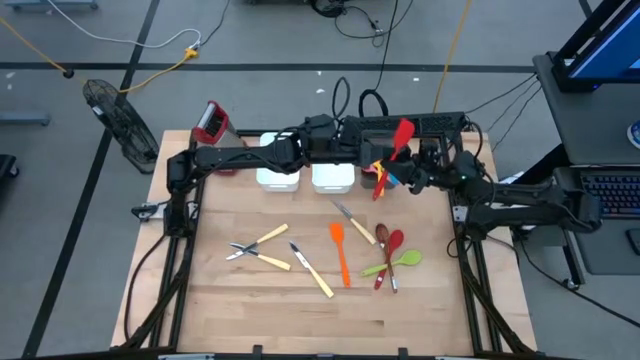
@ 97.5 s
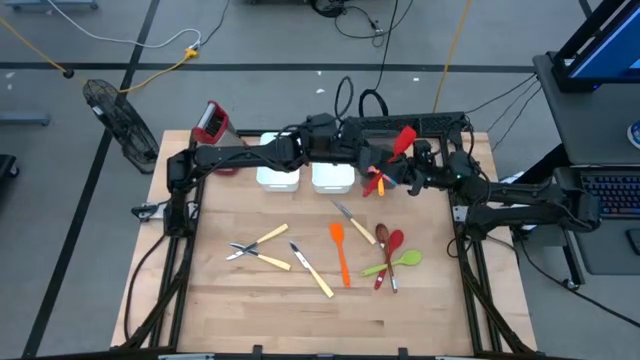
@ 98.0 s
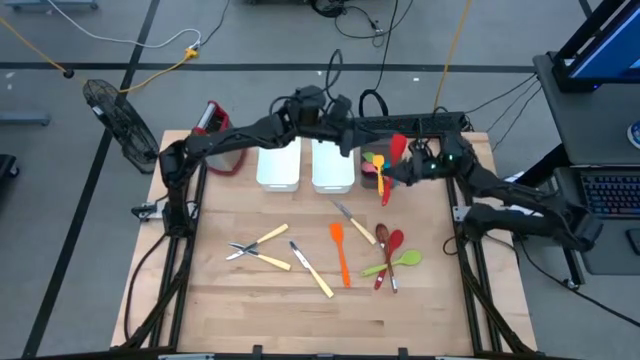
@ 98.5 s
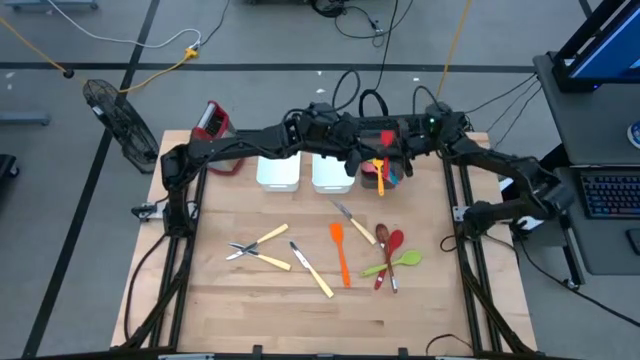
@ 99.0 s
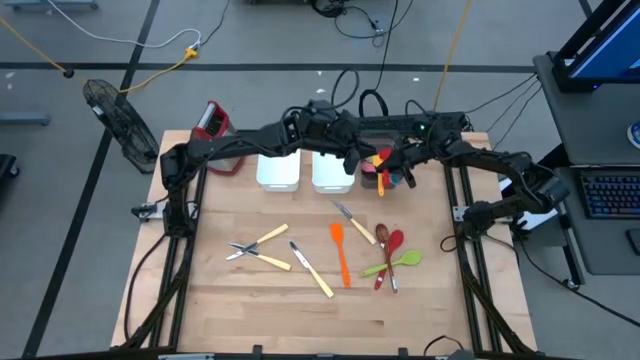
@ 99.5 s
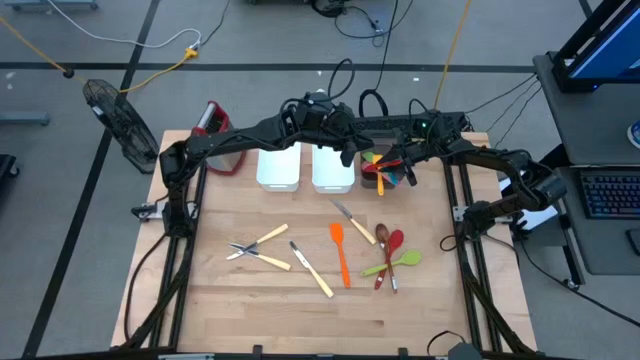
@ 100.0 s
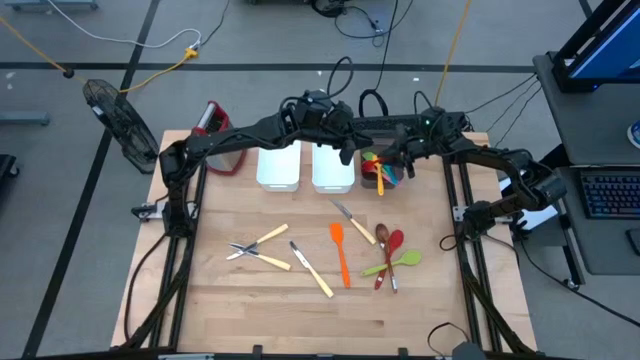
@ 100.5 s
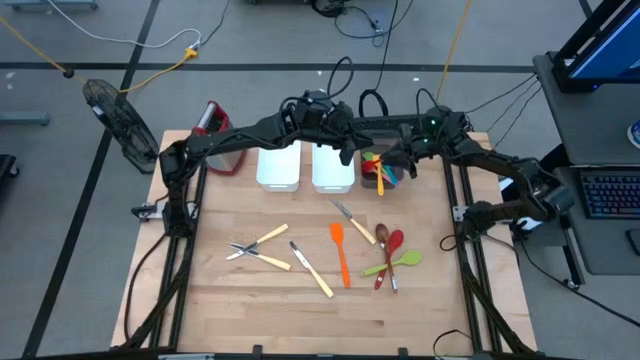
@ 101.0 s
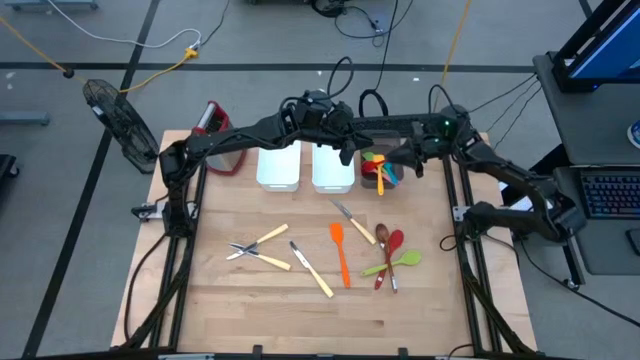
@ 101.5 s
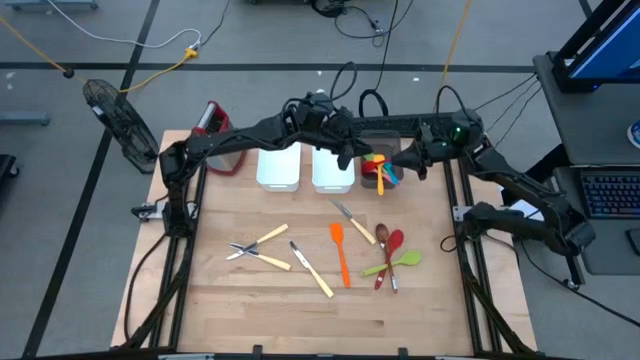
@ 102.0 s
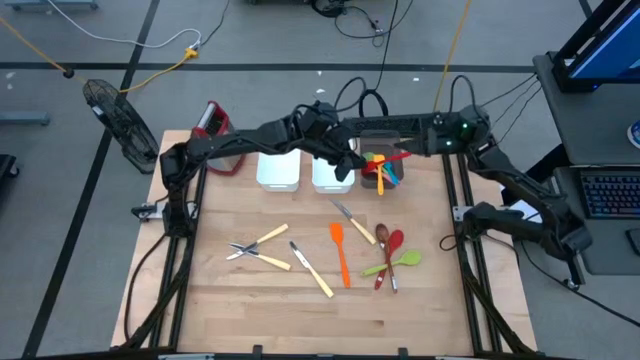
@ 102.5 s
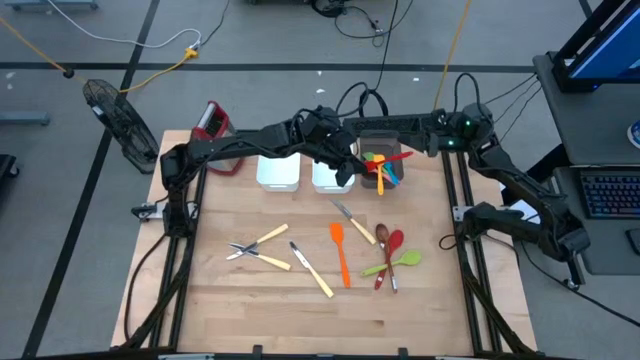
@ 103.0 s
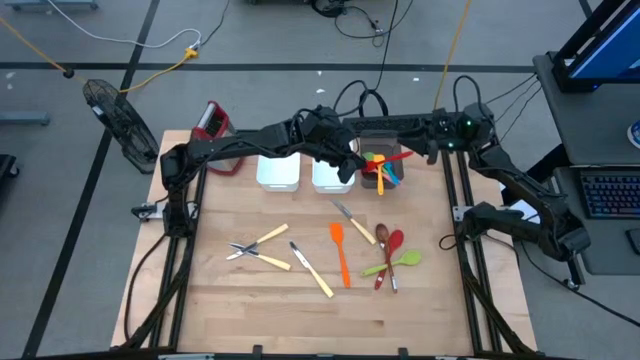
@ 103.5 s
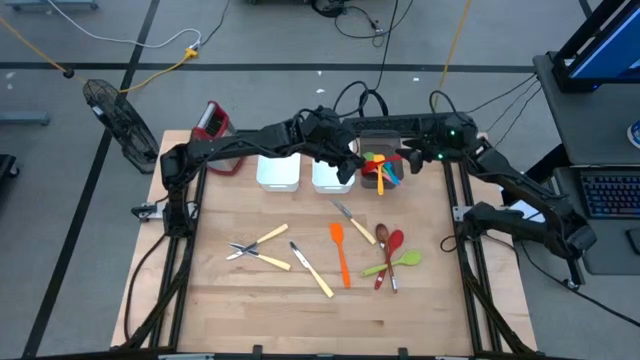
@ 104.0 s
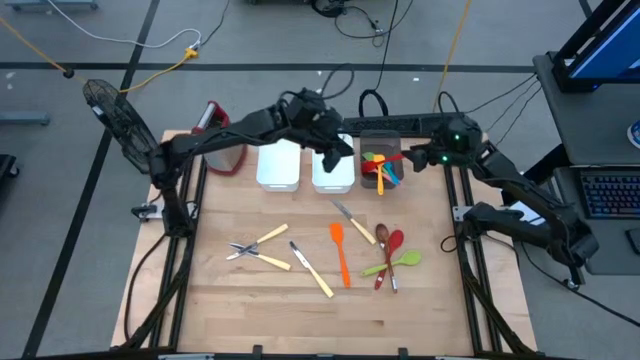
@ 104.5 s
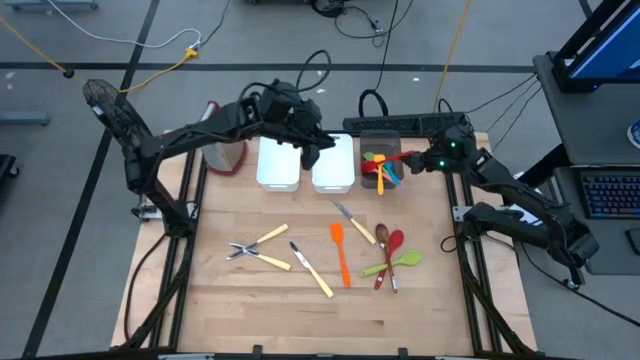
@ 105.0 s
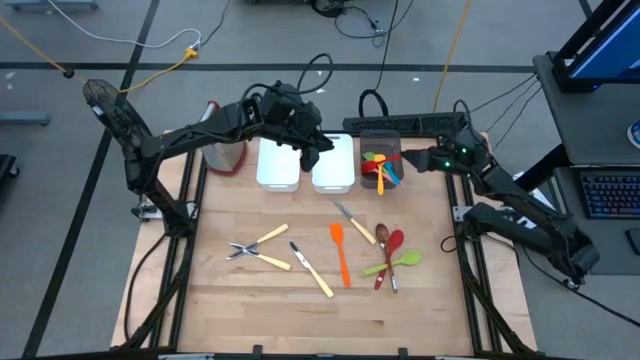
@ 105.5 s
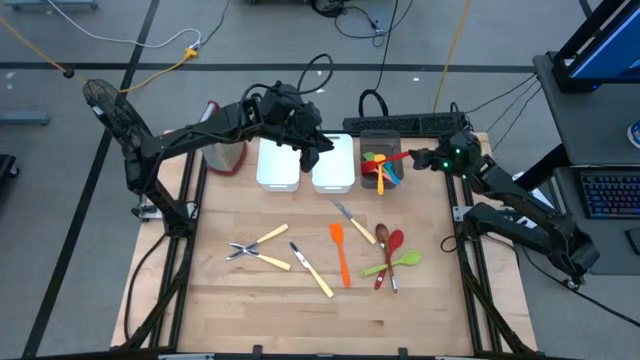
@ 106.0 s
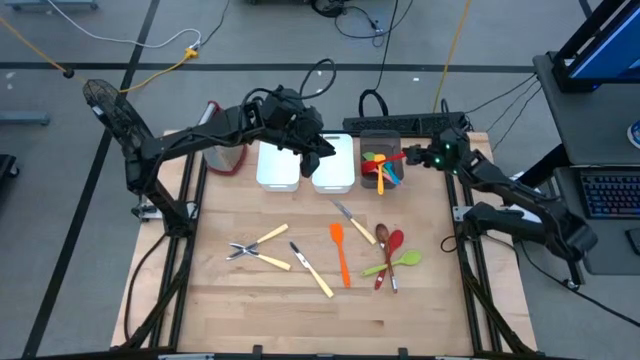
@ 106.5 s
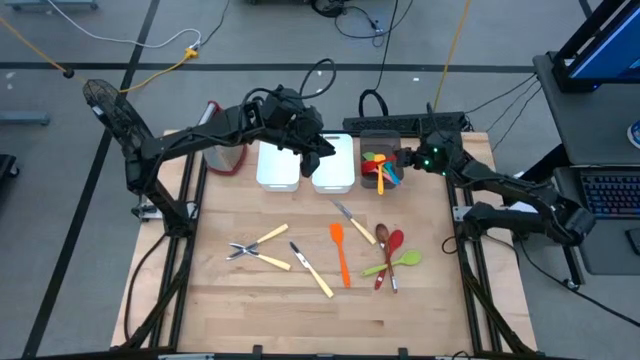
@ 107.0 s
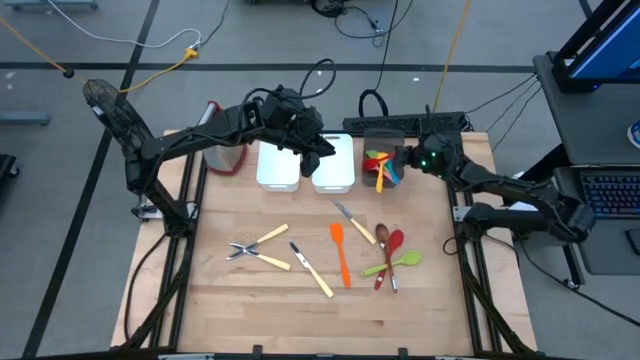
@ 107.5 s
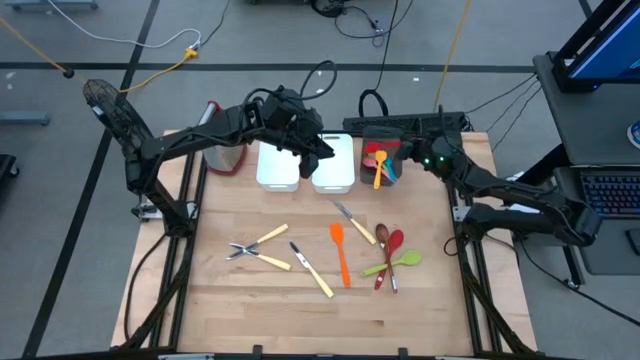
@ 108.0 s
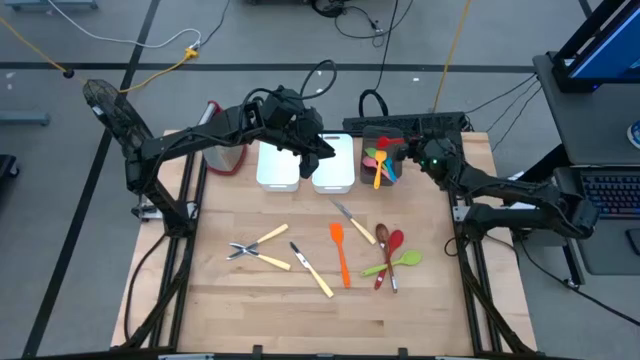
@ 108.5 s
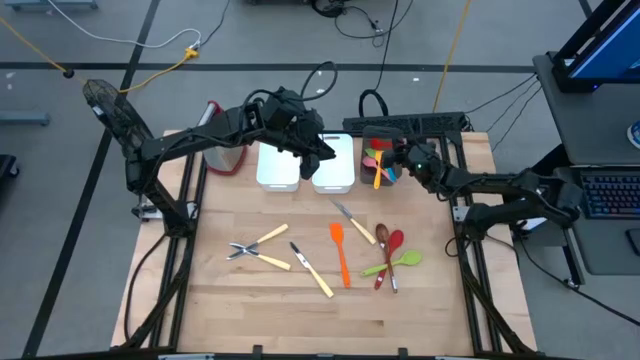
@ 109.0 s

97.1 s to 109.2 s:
Task: Pick & Place Kitchen Items
Put the red spatula into the black bin

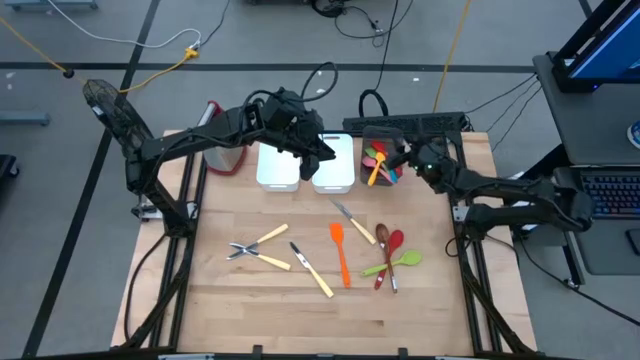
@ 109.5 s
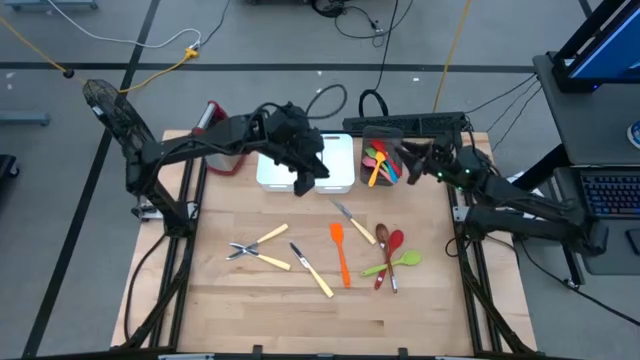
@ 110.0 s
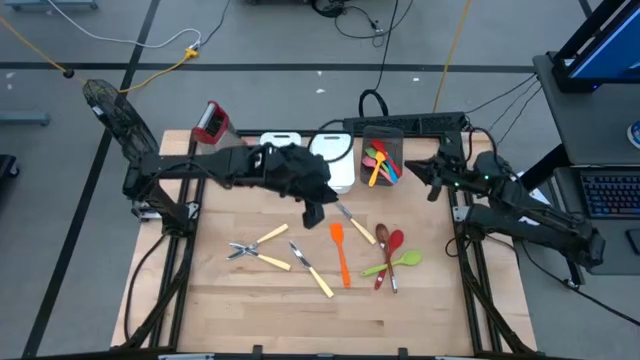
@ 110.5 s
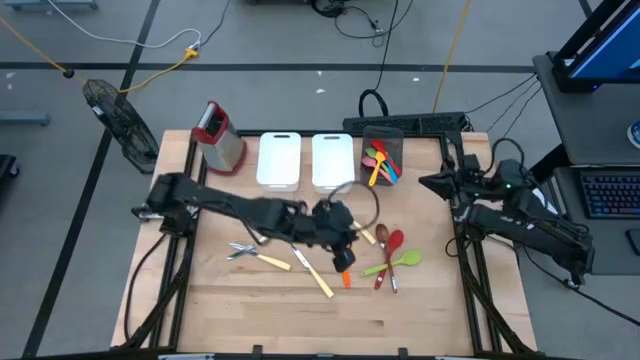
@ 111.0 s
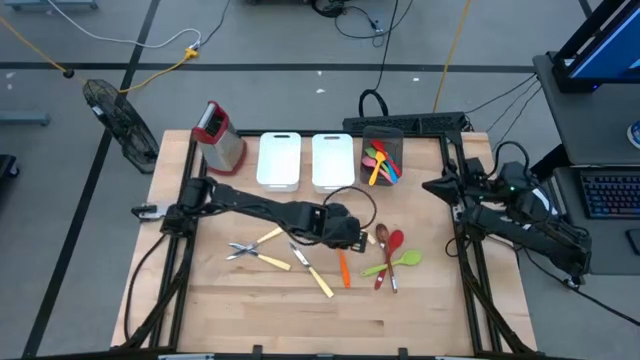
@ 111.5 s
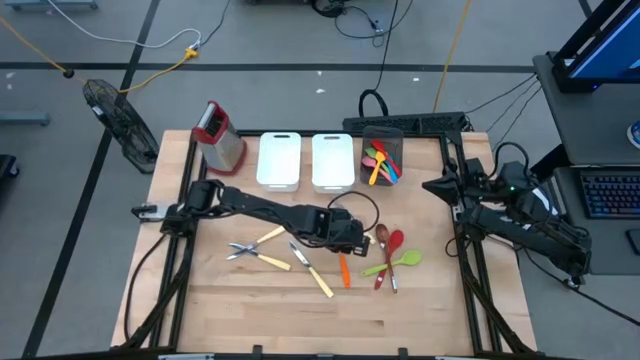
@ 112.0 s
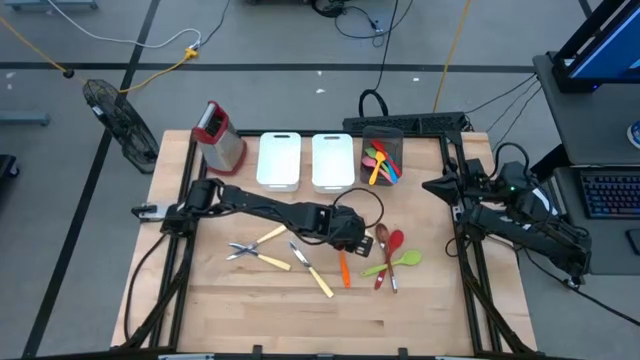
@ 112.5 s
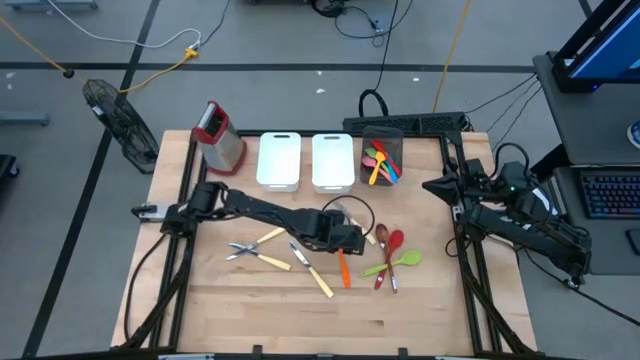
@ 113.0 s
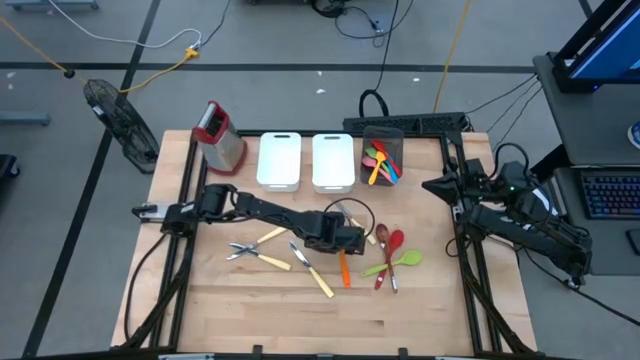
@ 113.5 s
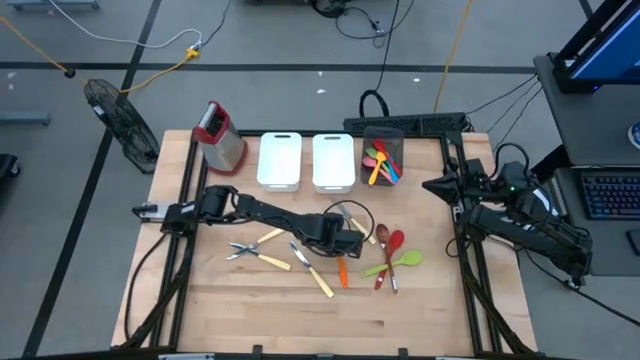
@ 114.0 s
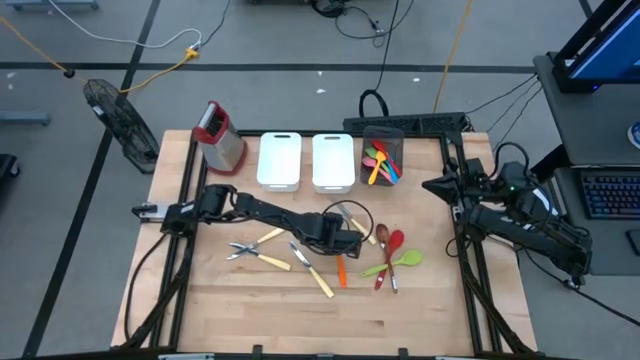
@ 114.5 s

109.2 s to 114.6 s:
Put the orange spatula into the black bin
